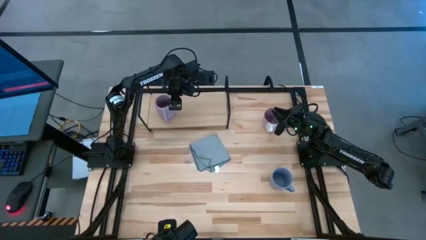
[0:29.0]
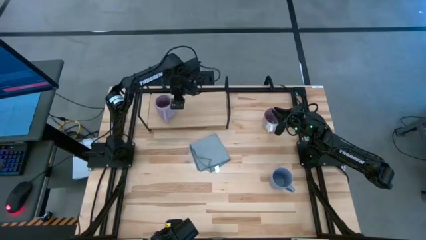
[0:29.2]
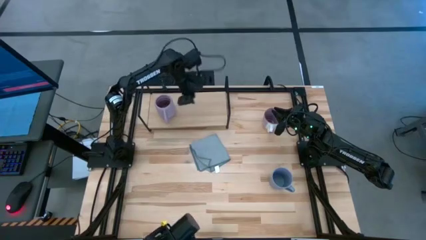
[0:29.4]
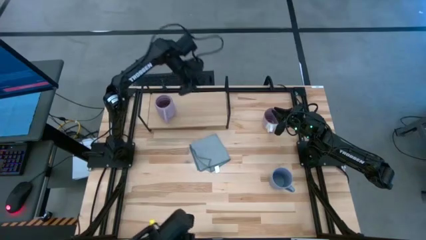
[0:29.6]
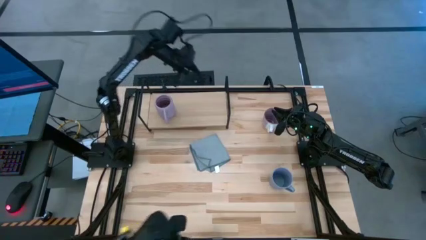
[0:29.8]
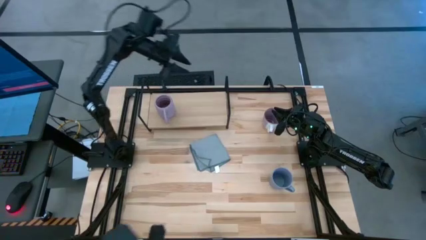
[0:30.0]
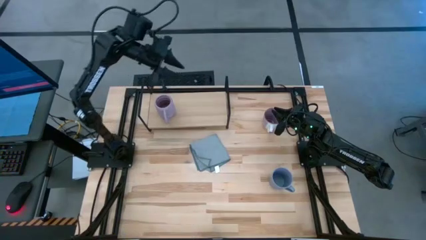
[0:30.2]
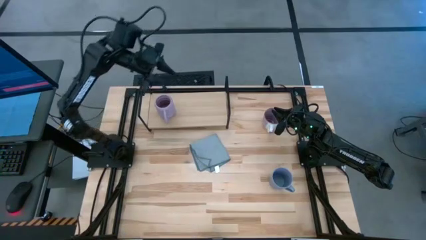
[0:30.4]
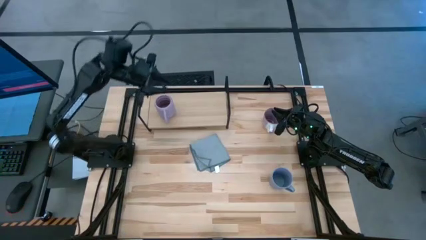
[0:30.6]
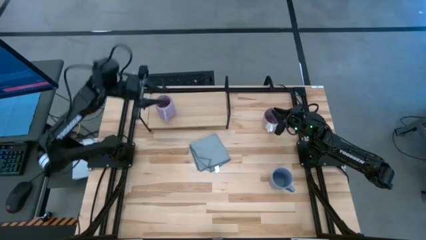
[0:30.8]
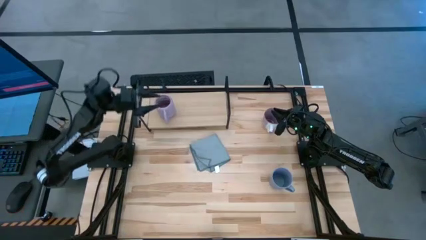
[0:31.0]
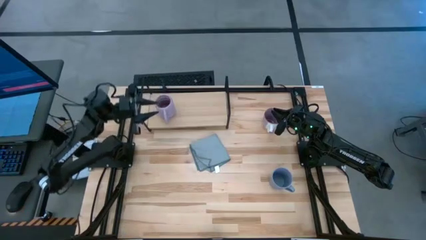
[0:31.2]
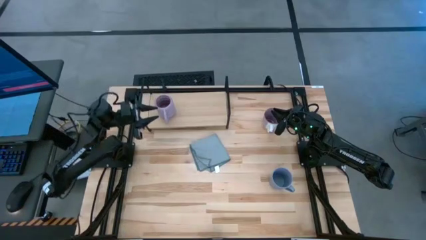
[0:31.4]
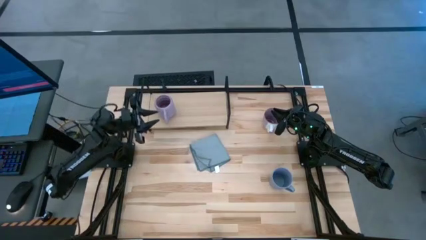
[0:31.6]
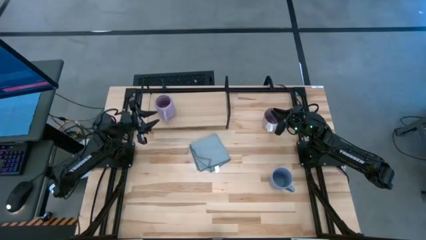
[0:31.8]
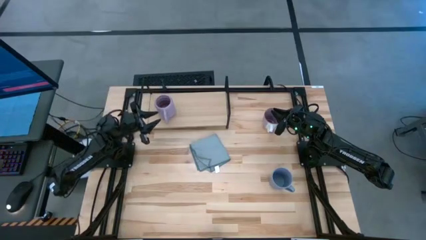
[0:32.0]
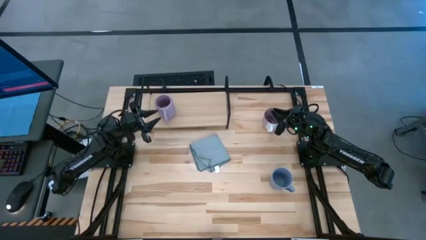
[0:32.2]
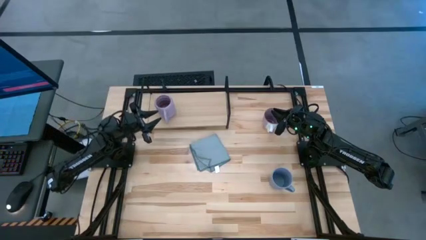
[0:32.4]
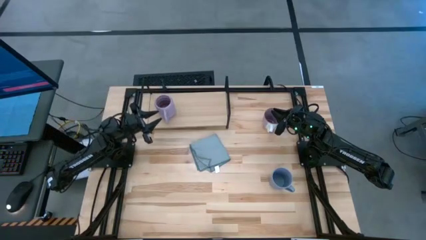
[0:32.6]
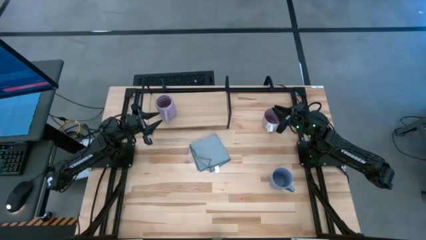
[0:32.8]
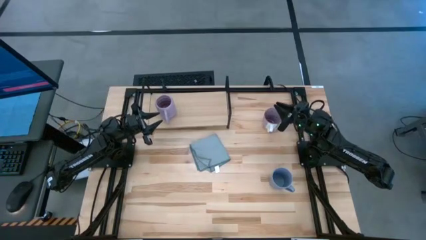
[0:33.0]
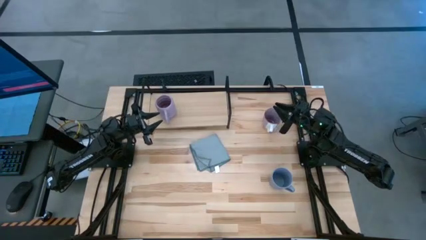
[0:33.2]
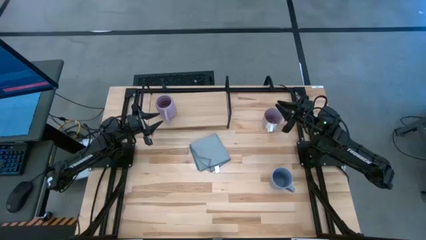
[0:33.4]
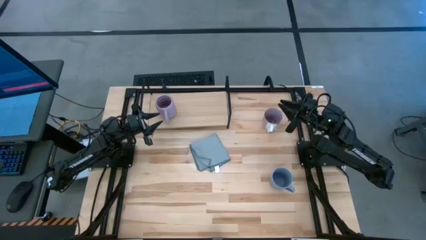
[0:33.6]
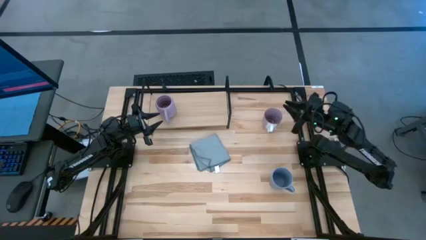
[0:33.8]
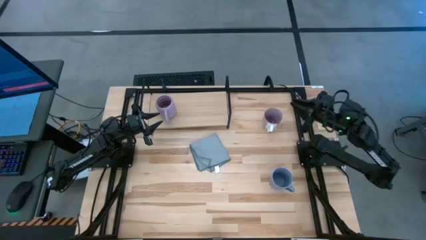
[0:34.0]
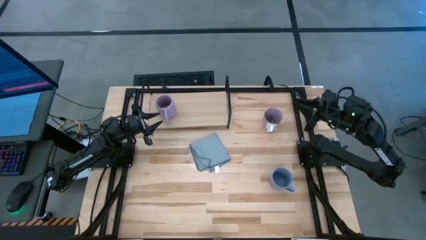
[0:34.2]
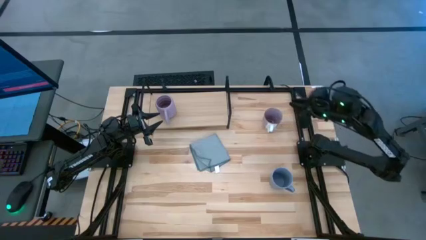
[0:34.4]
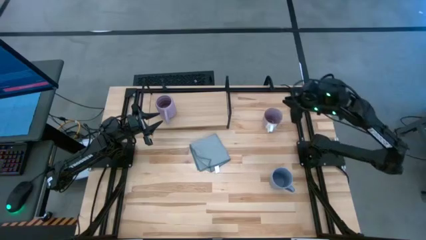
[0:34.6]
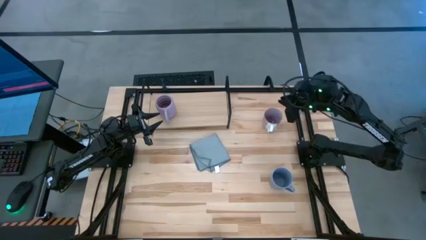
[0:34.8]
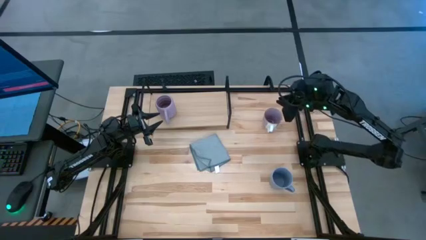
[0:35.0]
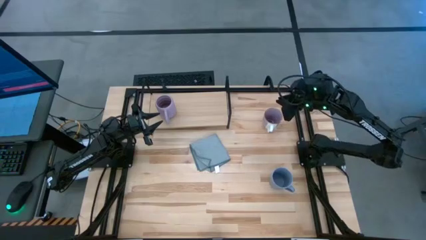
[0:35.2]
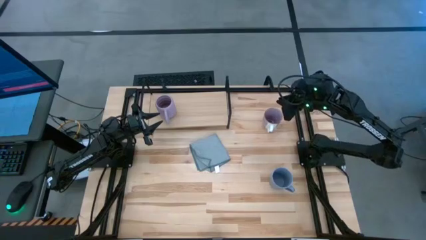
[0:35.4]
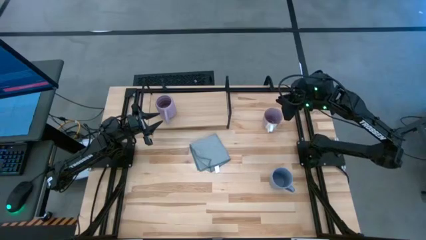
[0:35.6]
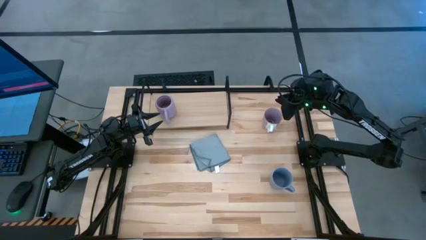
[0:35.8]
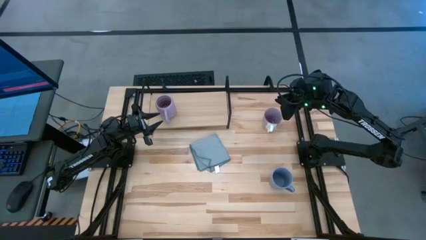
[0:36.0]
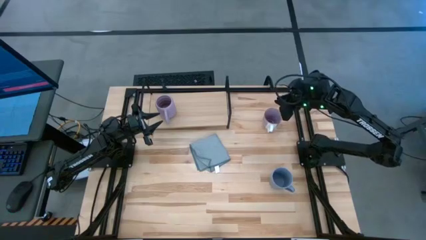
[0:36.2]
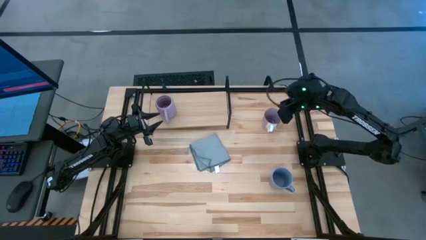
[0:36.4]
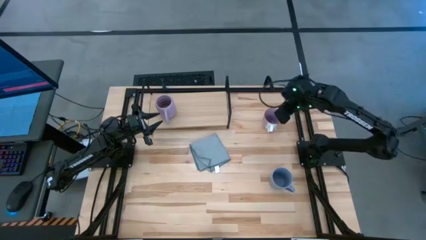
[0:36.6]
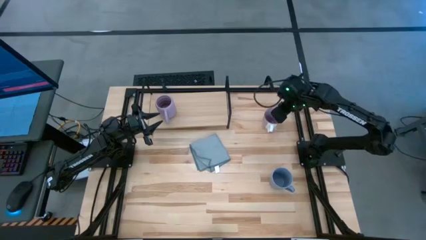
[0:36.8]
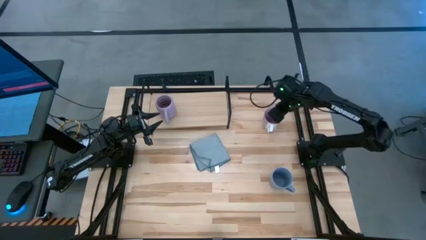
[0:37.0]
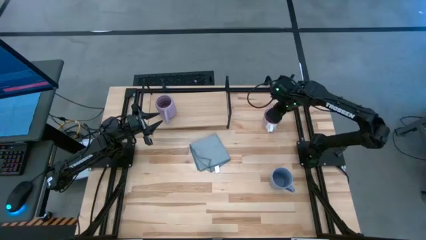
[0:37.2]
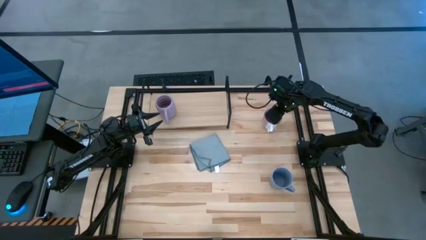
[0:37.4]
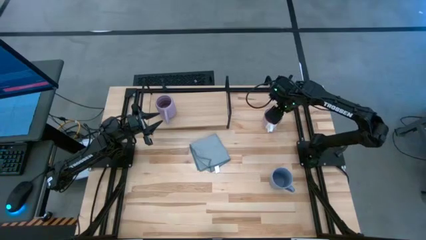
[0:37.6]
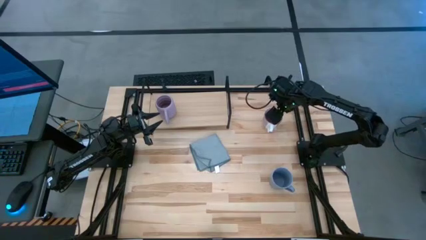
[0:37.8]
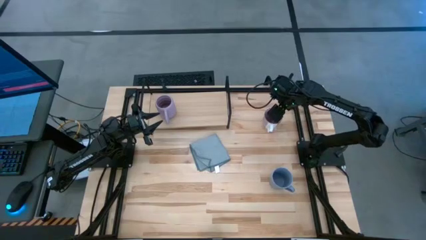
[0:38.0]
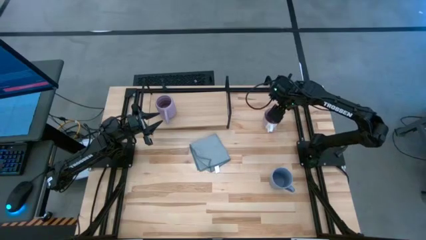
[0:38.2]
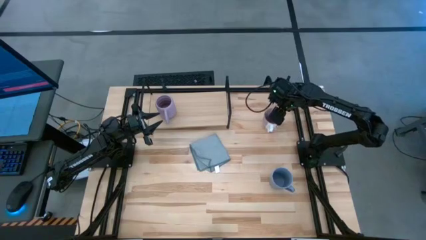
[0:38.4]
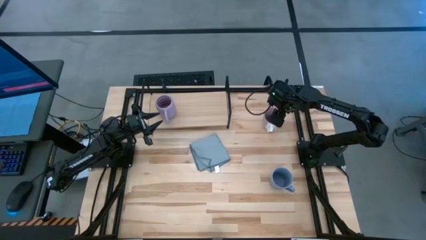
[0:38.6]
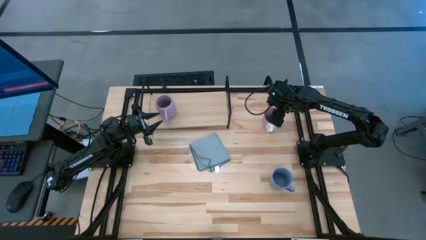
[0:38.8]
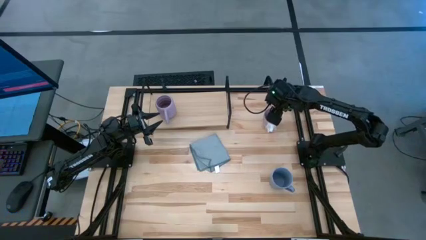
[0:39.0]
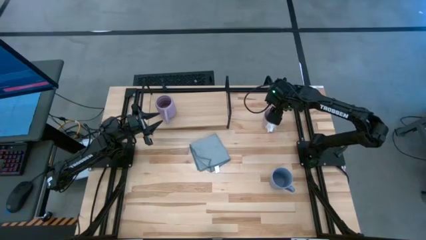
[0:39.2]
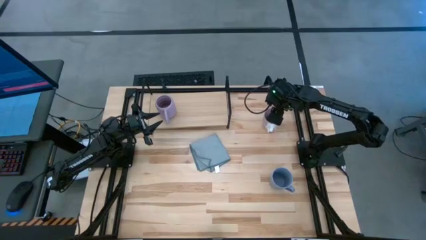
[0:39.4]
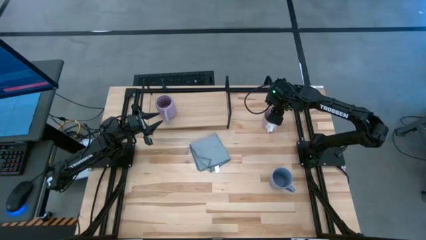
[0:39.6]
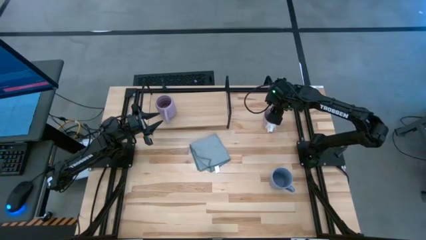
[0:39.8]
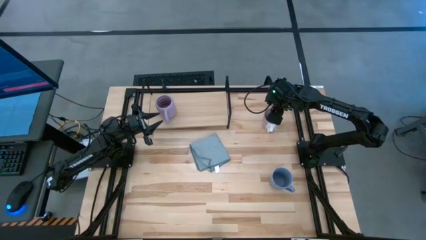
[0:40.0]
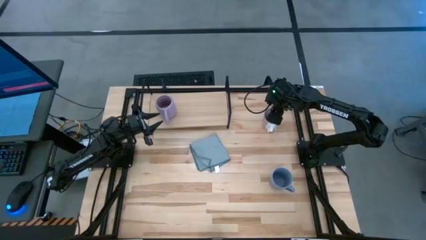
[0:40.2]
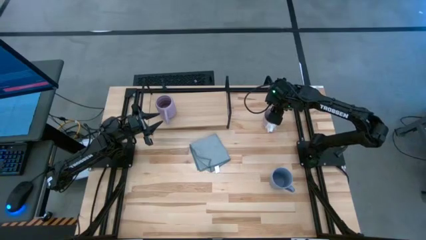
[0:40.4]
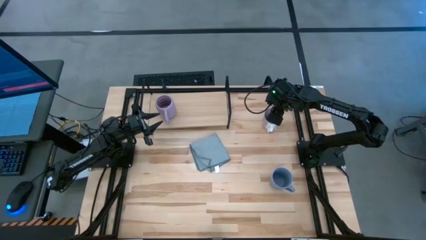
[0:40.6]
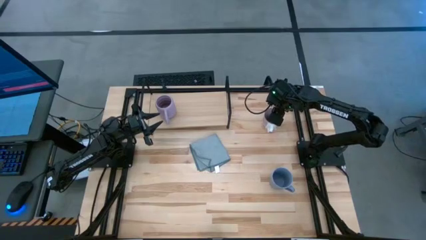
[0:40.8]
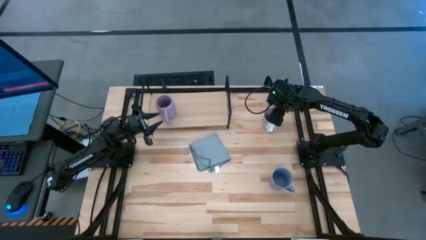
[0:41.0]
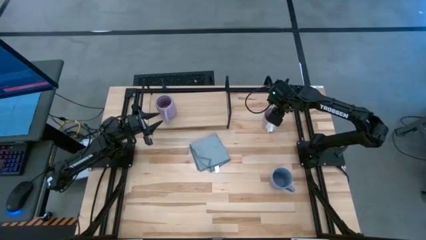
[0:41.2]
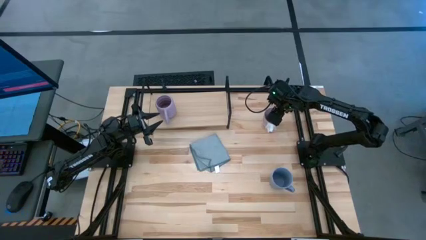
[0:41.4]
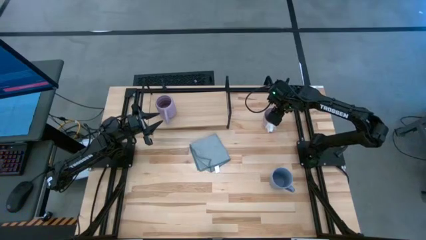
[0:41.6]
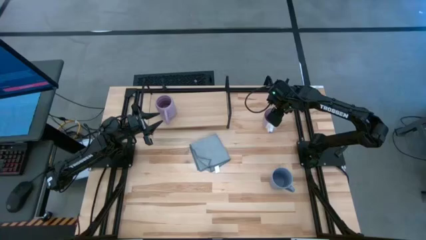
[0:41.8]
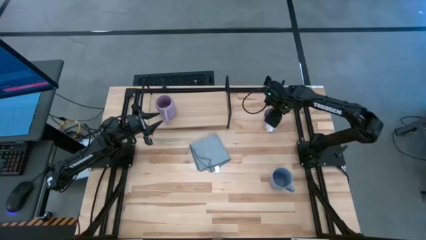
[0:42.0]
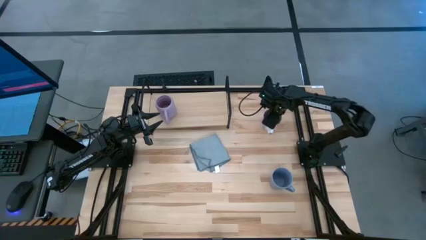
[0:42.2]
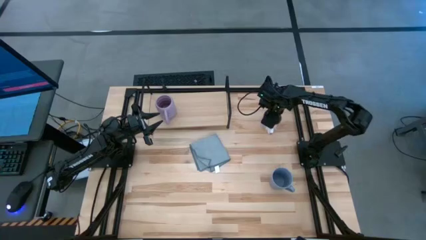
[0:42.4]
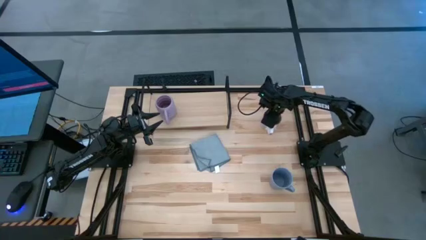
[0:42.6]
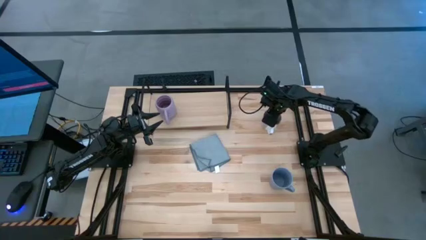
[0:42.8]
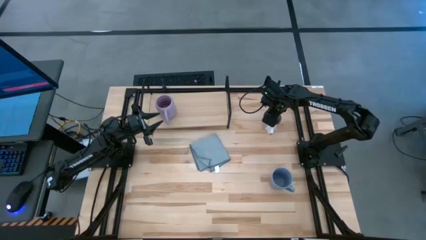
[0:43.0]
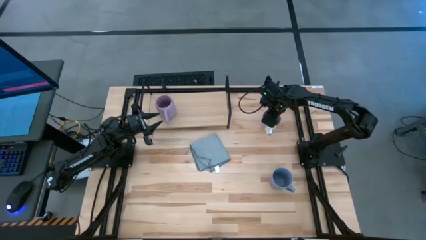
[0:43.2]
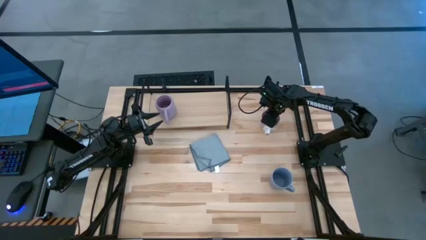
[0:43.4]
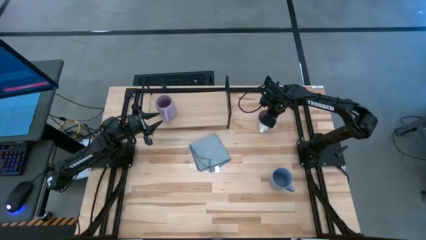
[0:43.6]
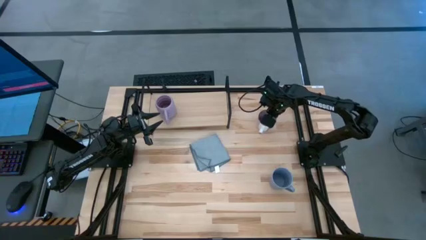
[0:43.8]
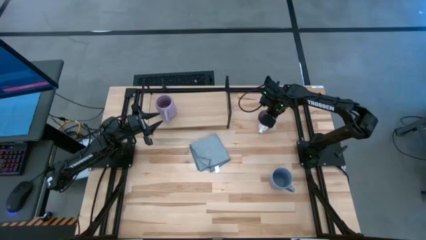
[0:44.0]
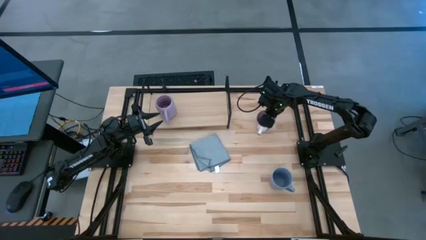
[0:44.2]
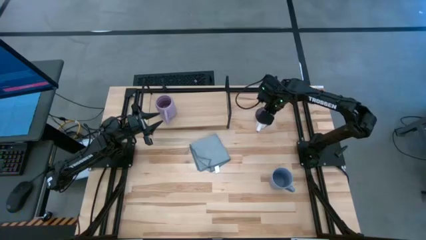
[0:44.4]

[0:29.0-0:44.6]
Task: Stack small to large cups/mugs on shelf
Put the violet patterned mug on the shelf
